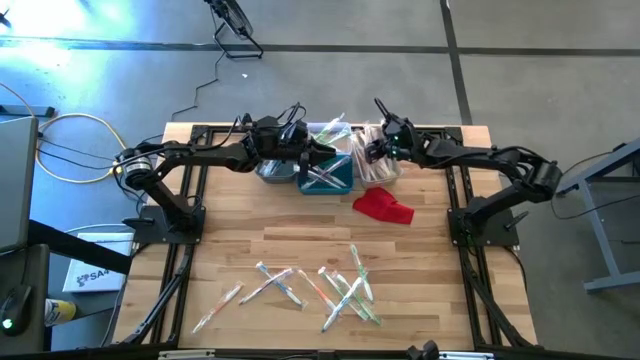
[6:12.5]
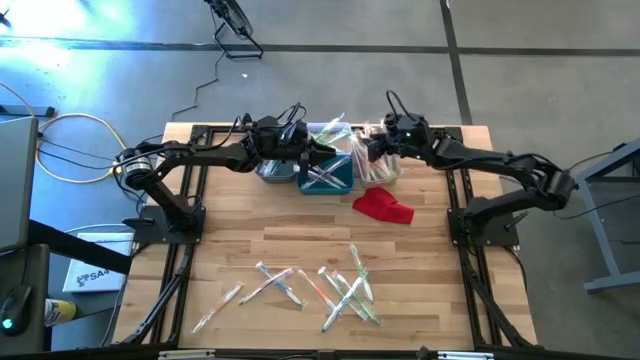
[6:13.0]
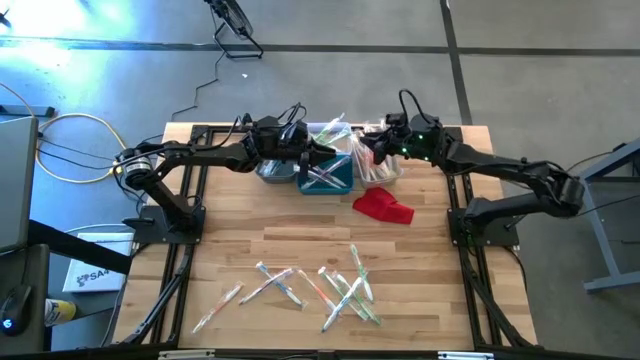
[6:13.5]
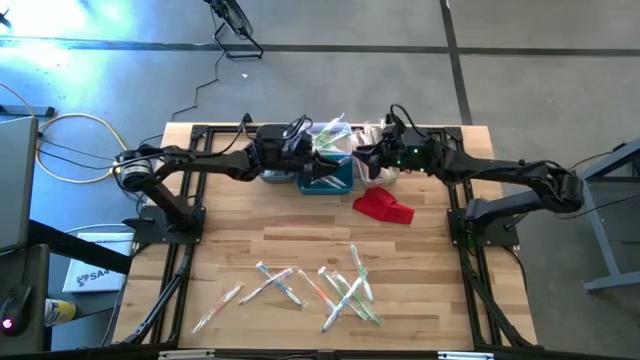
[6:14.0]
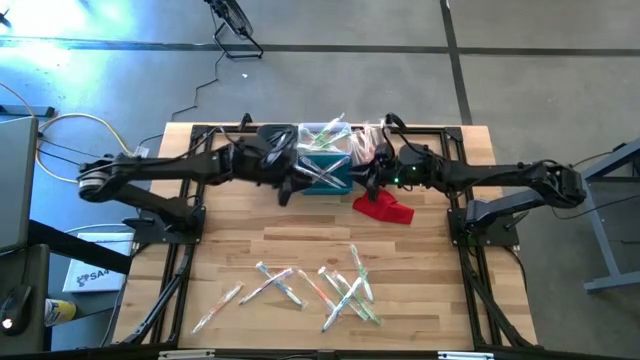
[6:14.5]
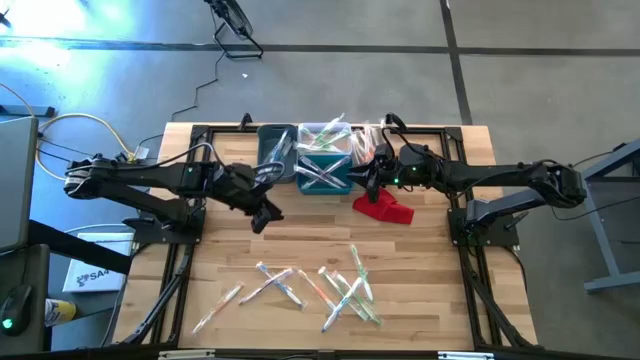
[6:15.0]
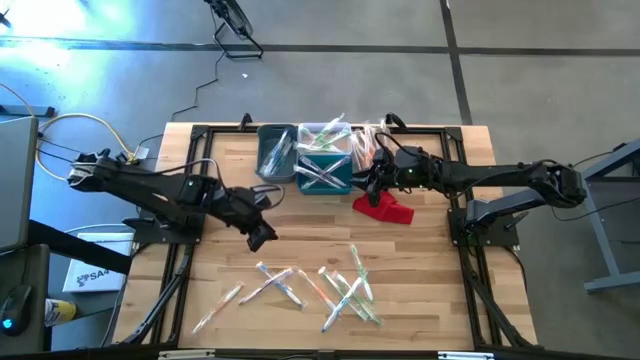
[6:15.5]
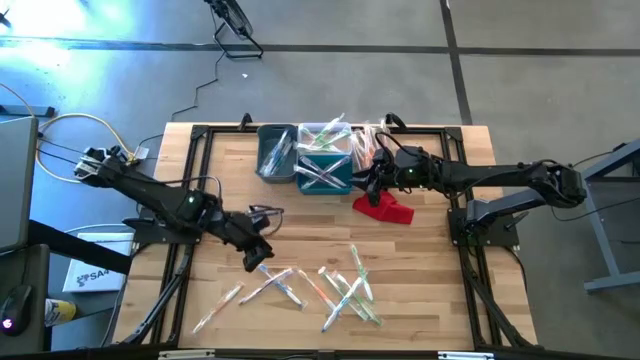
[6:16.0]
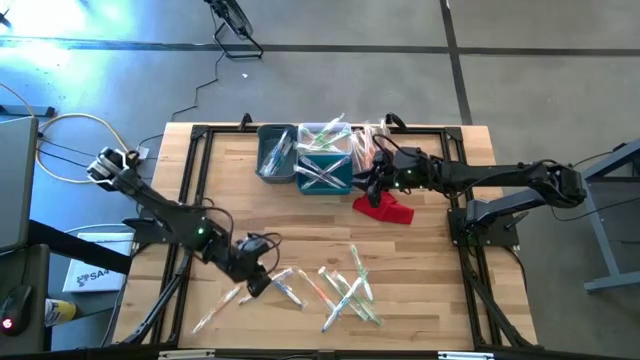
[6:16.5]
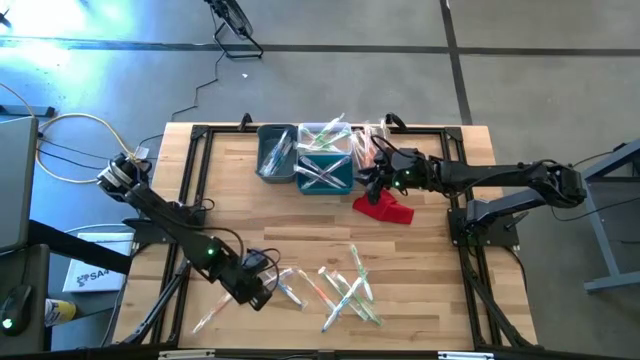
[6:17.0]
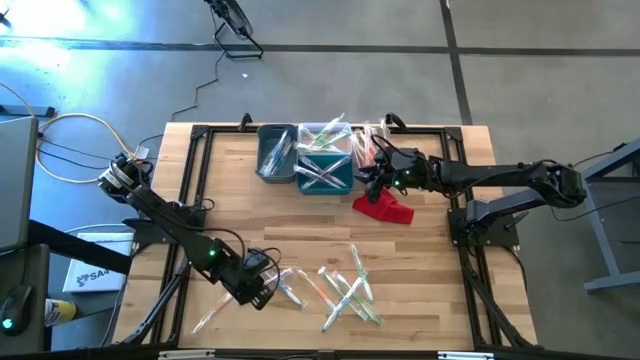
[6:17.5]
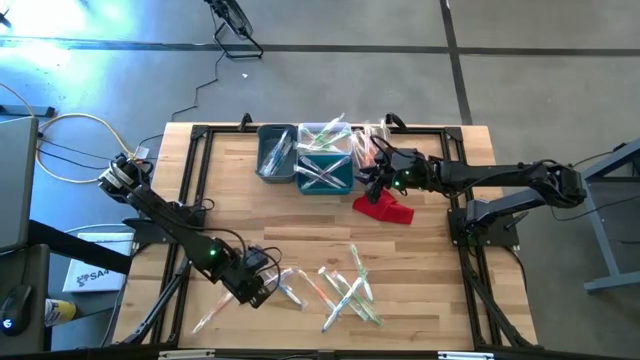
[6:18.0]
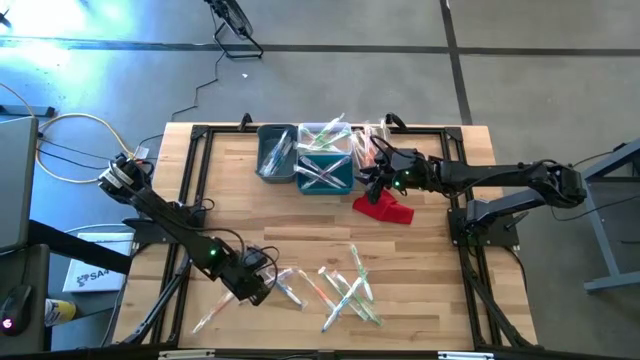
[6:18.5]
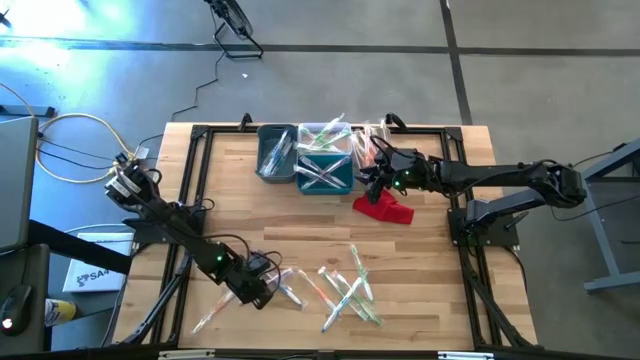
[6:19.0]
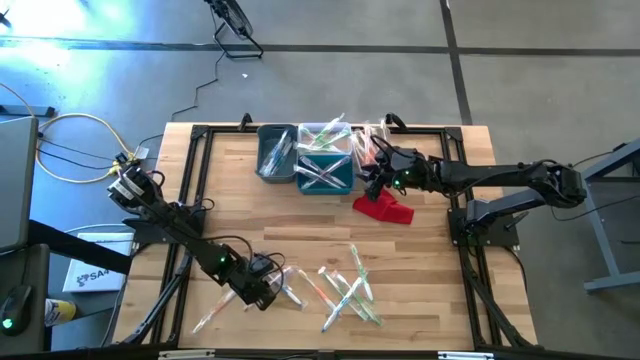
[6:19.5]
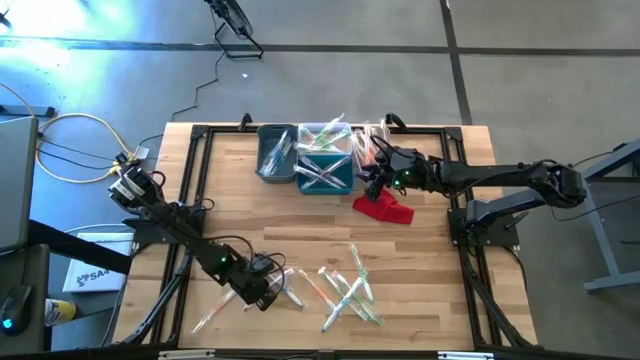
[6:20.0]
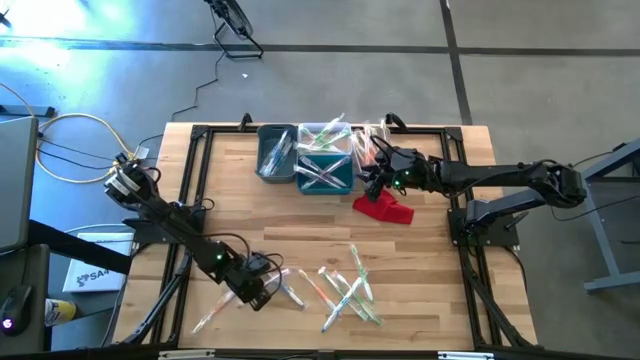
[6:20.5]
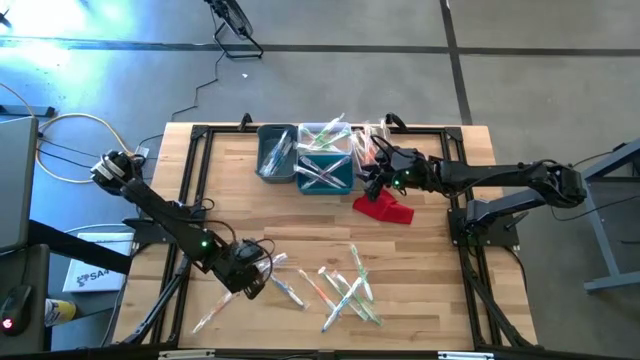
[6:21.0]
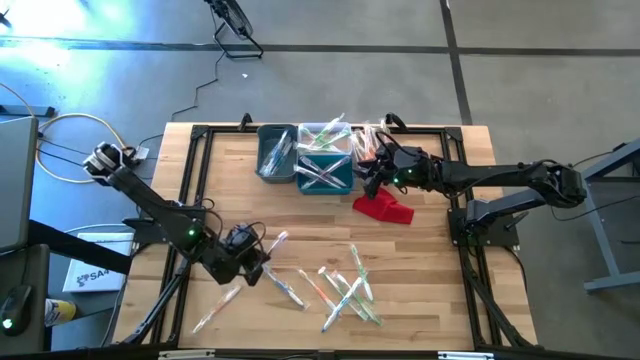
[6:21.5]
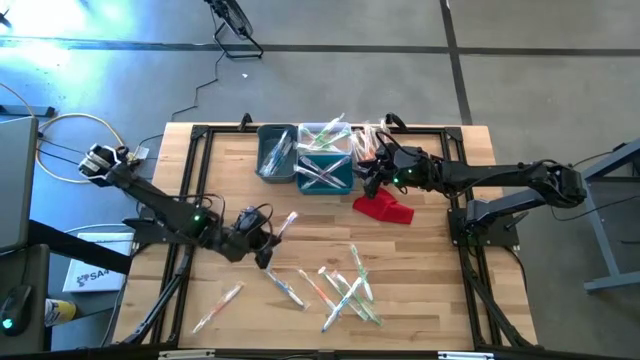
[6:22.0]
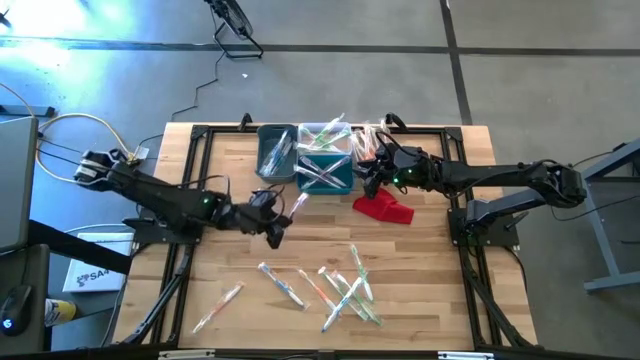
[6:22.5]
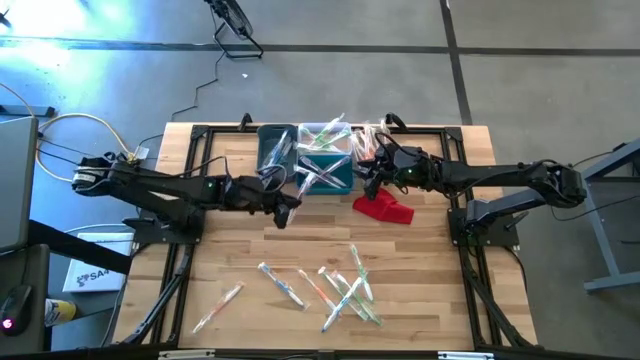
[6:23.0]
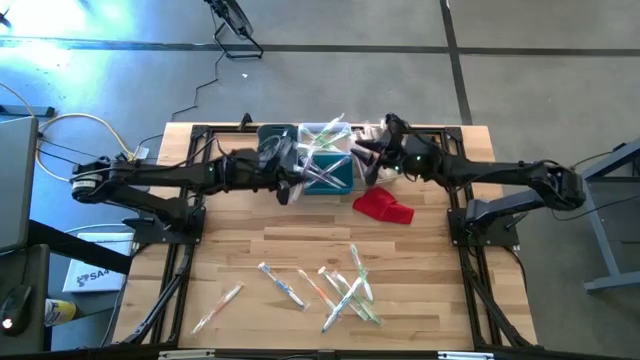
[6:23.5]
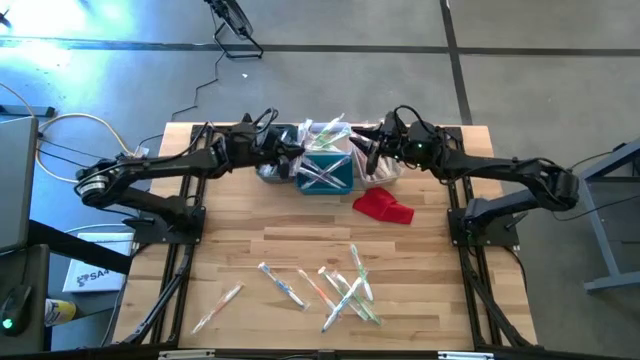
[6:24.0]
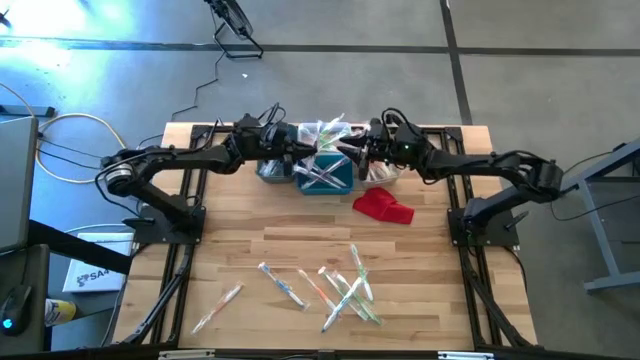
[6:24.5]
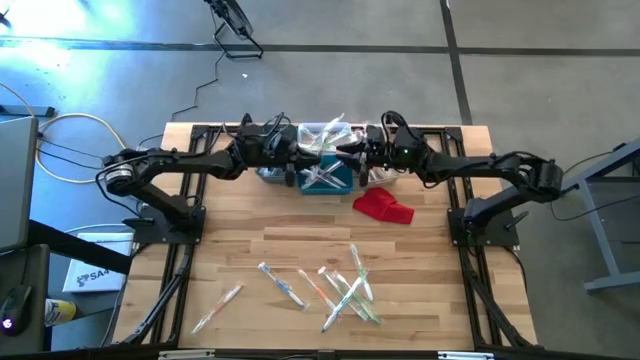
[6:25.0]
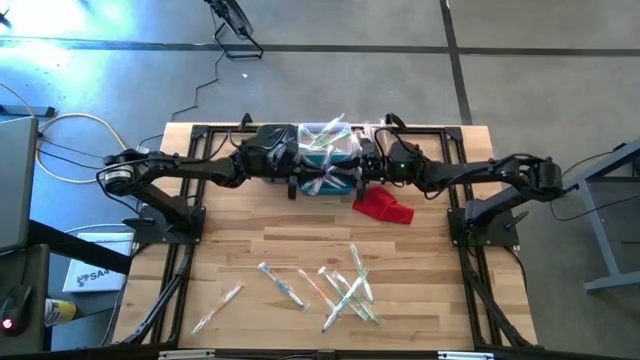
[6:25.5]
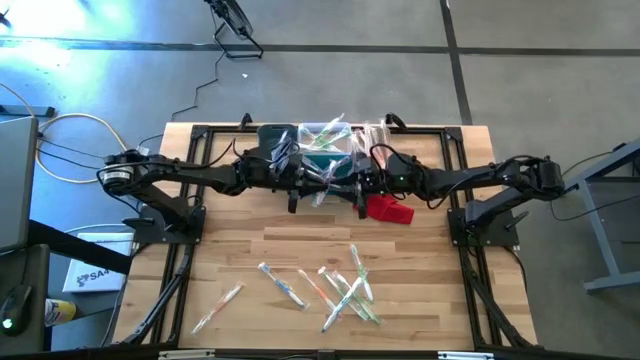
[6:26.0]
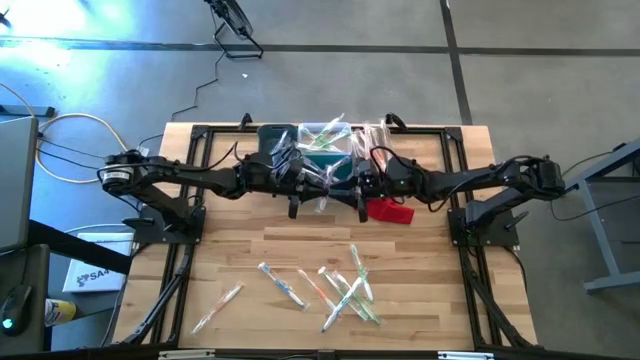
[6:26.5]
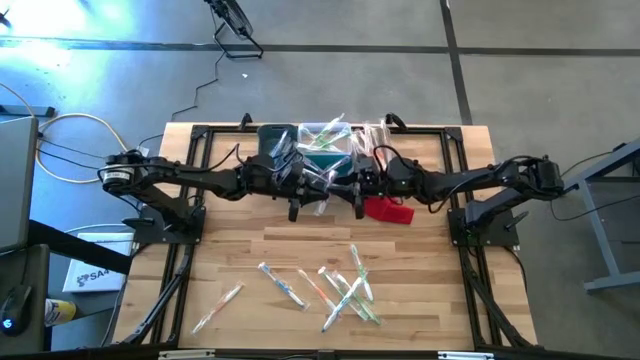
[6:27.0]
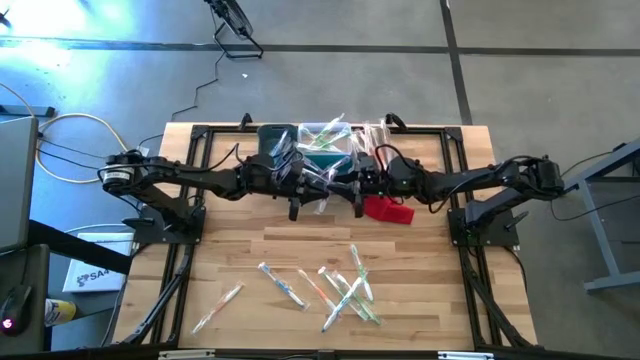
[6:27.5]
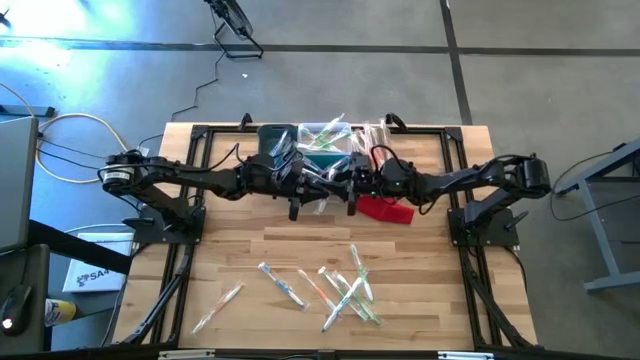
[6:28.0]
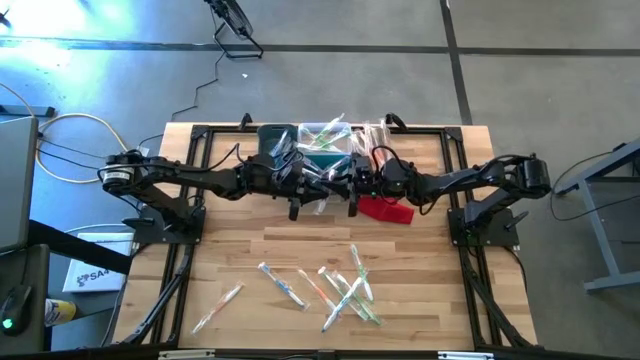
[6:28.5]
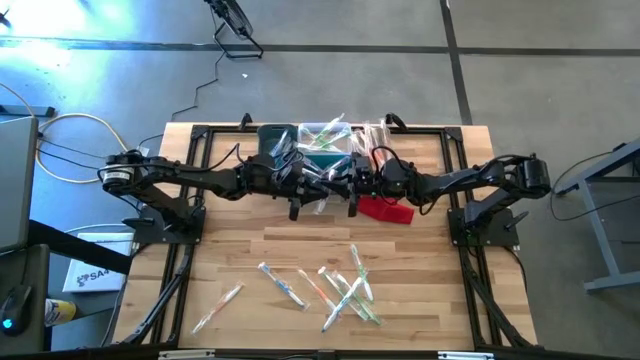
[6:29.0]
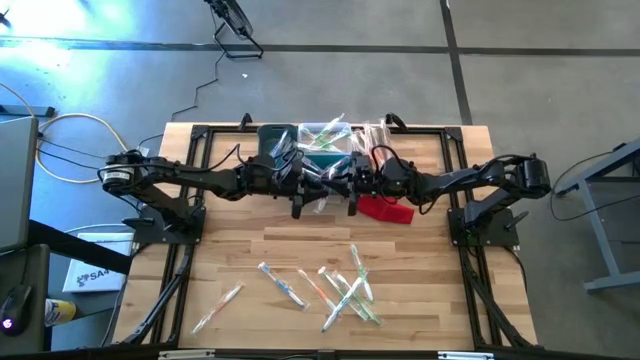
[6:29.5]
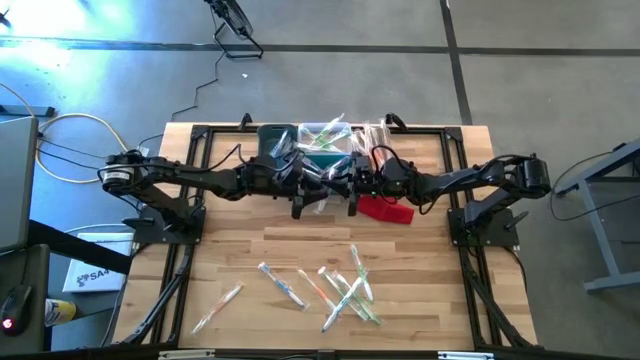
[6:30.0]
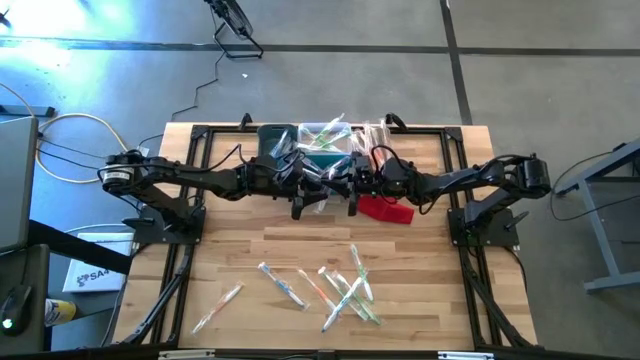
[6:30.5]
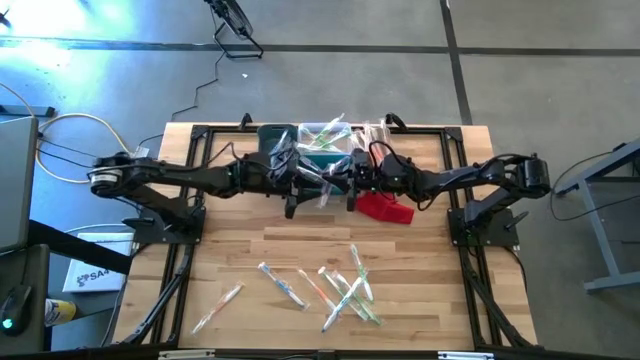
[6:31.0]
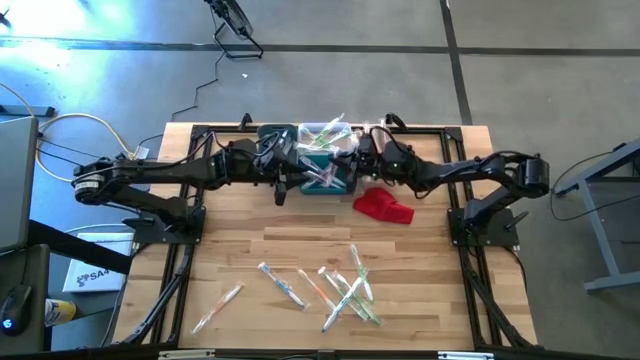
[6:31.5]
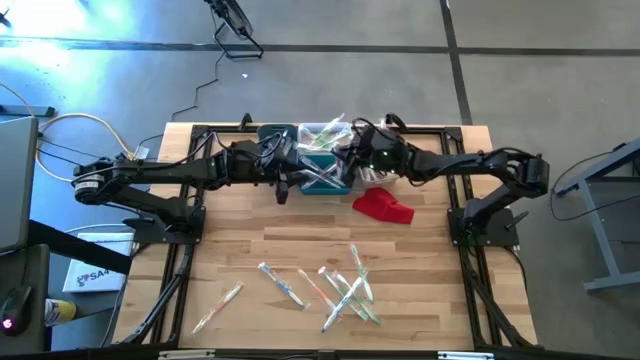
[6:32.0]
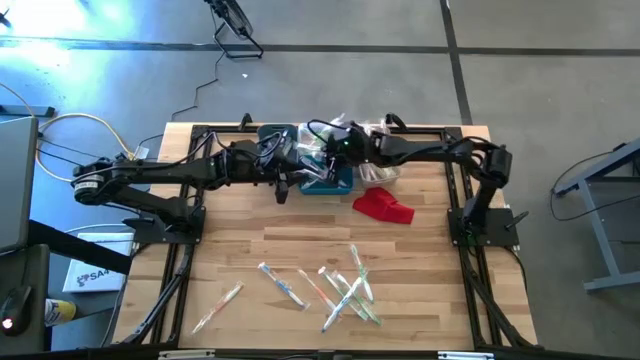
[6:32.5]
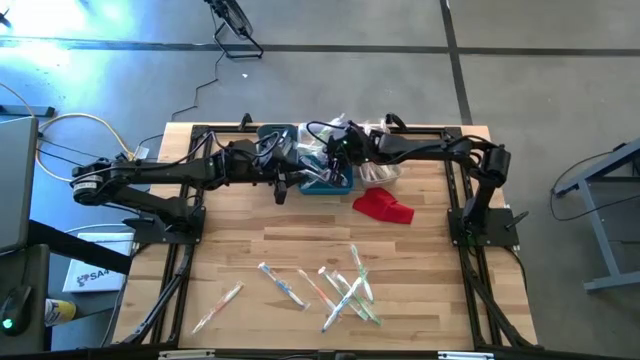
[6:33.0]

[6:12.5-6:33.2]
Task: Pick & Place Toothbrushes
Put the purple toothbrush into the blue bin
